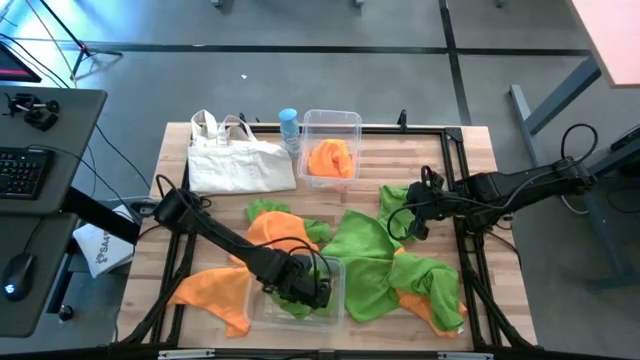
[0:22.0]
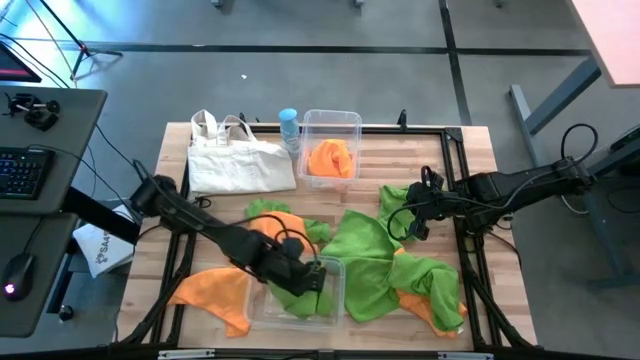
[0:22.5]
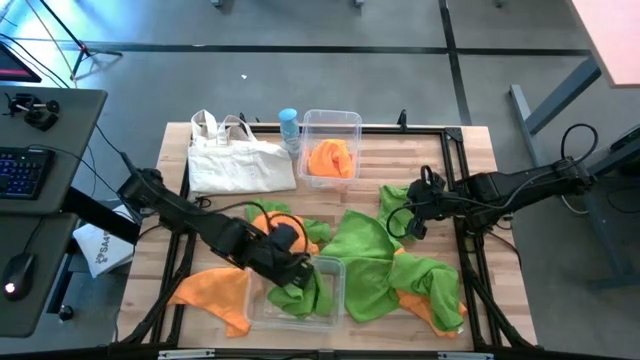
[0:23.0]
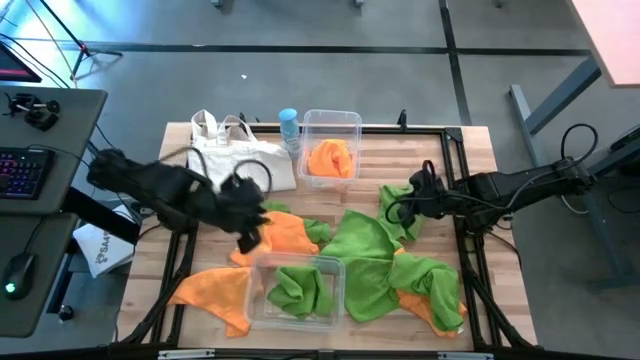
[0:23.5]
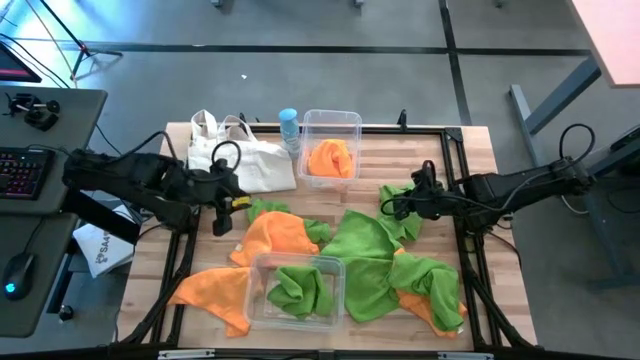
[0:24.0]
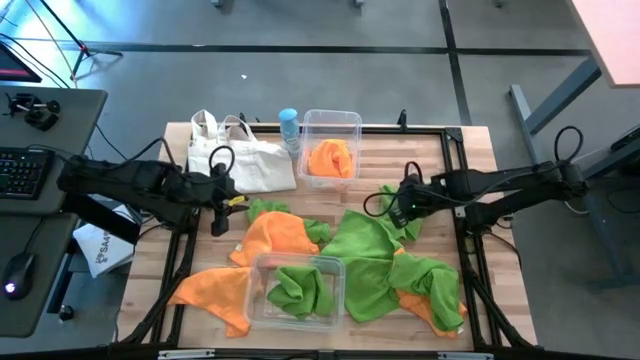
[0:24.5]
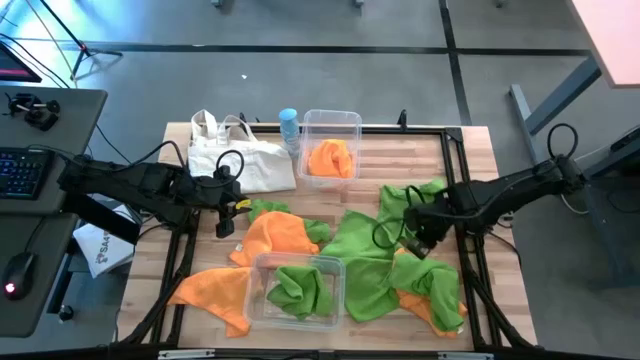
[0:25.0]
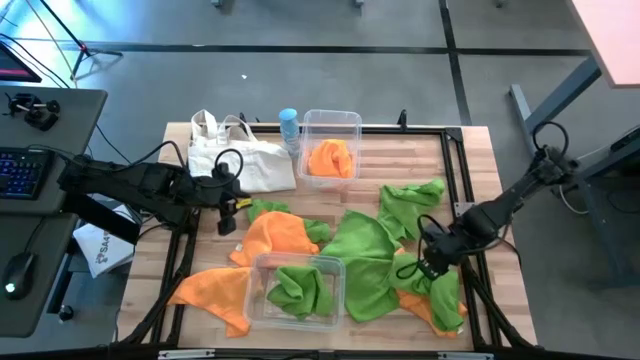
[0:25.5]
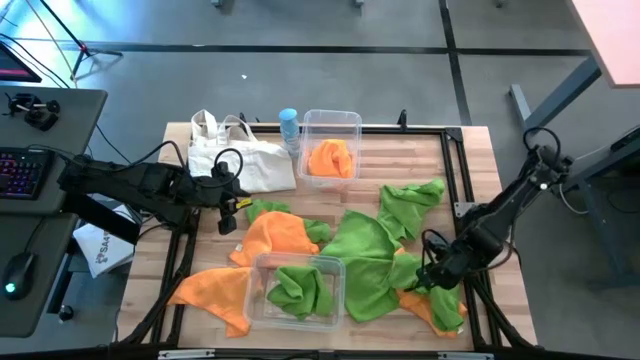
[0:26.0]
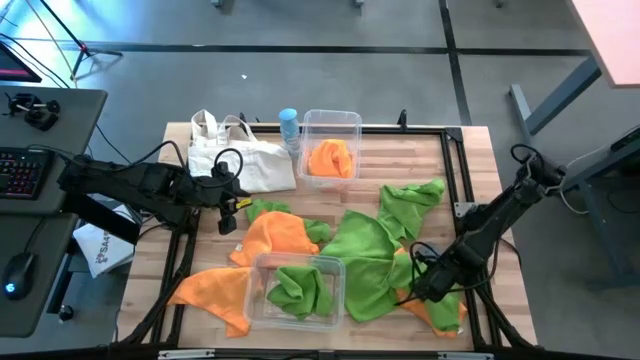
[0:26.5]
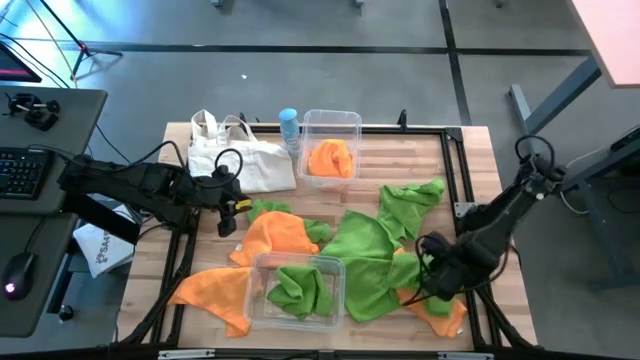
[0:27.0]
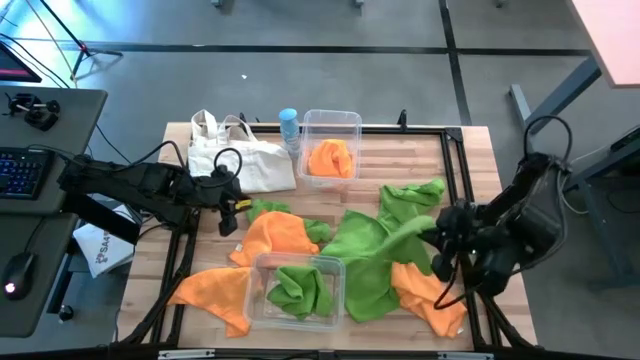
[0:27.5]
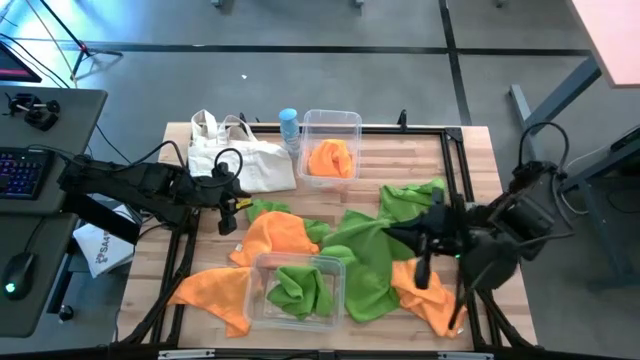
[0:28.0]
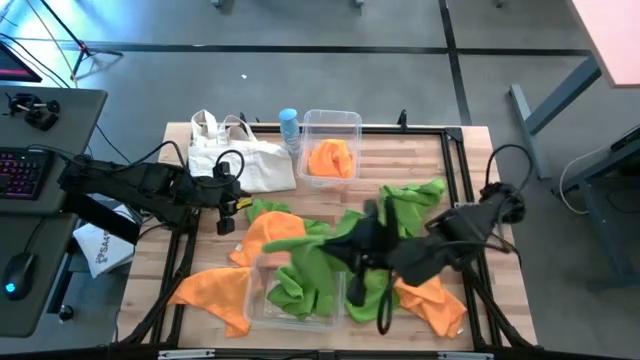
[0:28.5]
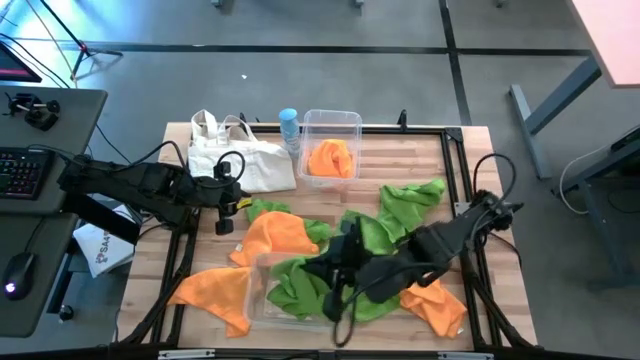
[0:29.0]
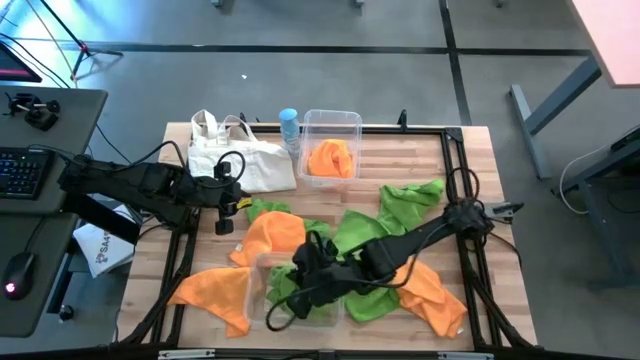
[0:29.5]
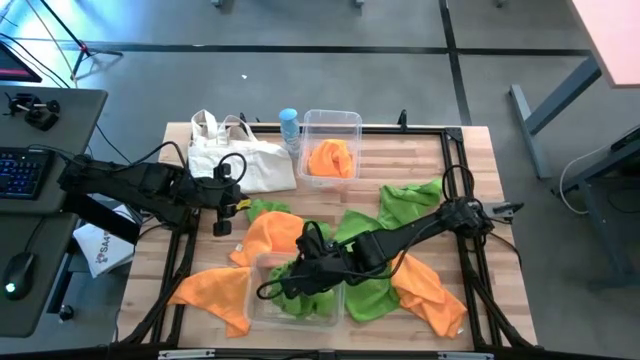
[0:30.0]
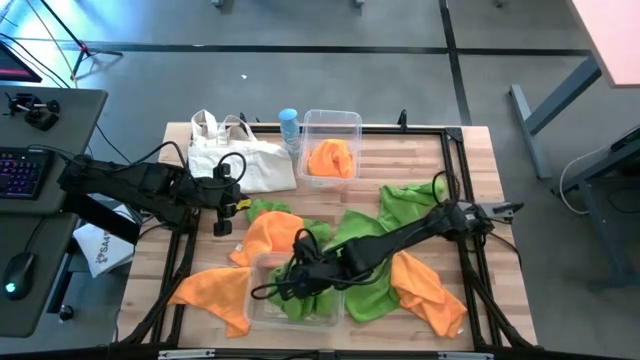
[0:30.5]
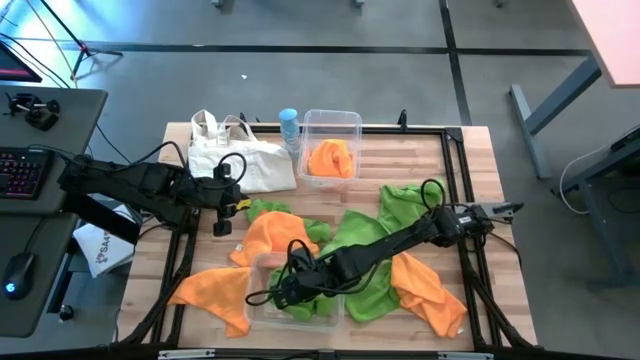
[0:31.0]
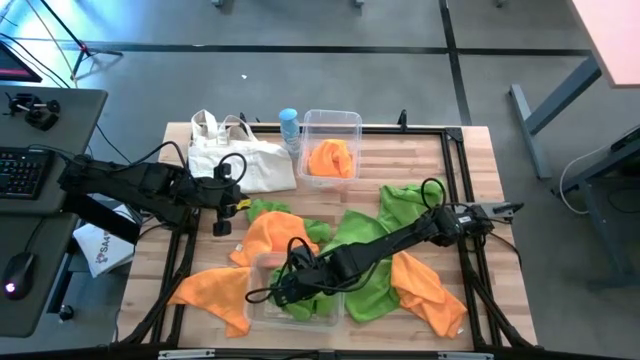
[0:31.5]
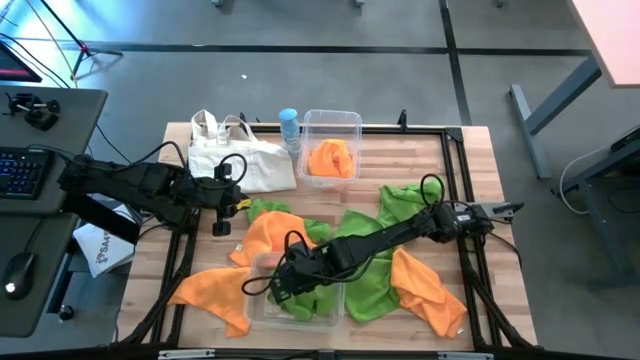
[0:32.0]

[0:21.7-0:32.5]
Task: Sort microfiber towel by color & place in baskets
Put the green microfiber cloth into the bottom transparent bin

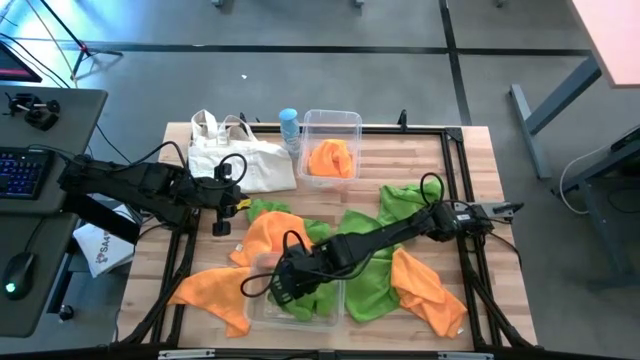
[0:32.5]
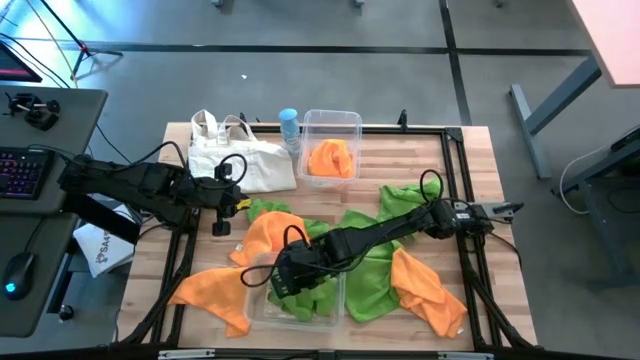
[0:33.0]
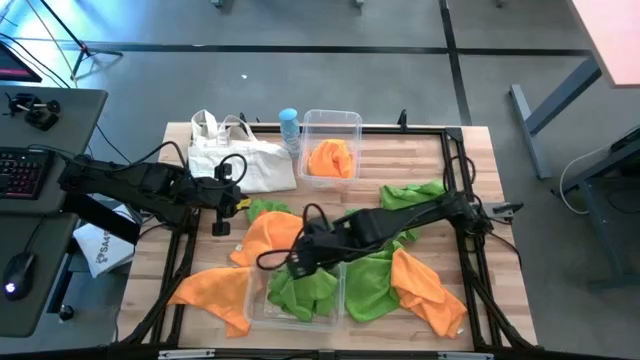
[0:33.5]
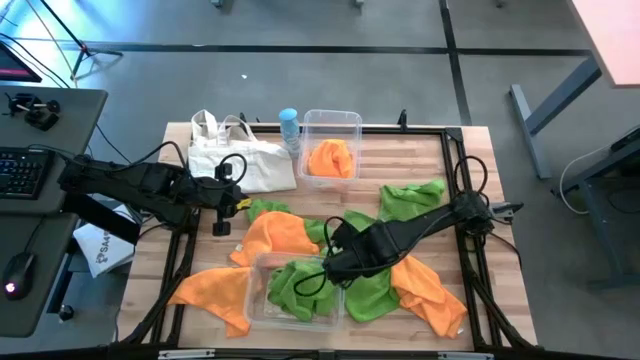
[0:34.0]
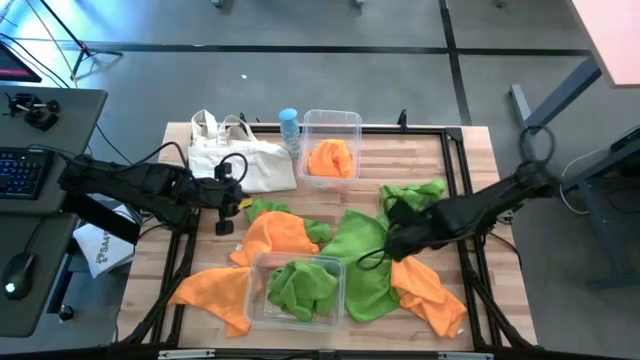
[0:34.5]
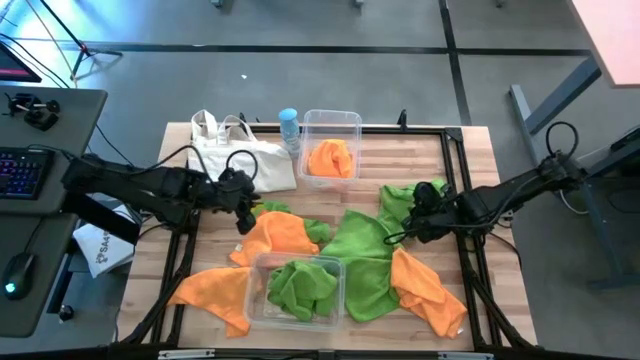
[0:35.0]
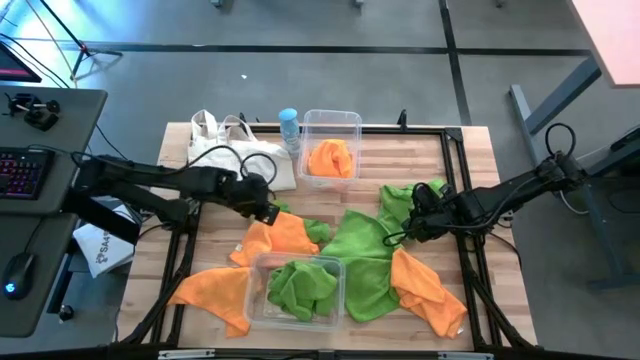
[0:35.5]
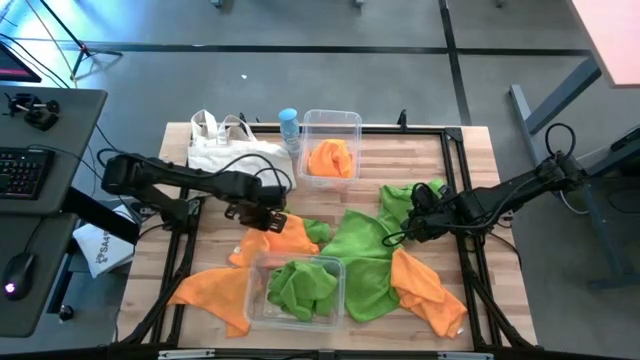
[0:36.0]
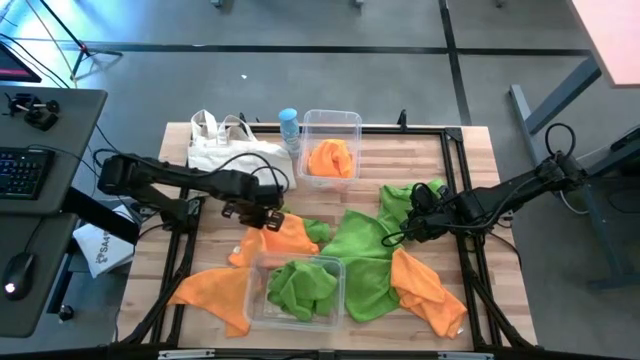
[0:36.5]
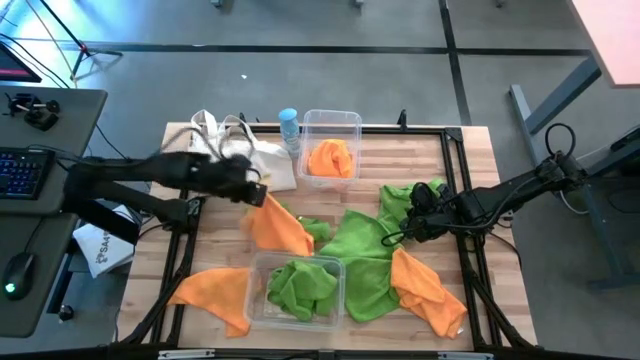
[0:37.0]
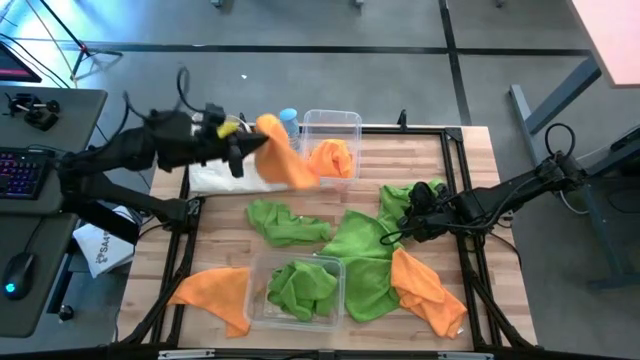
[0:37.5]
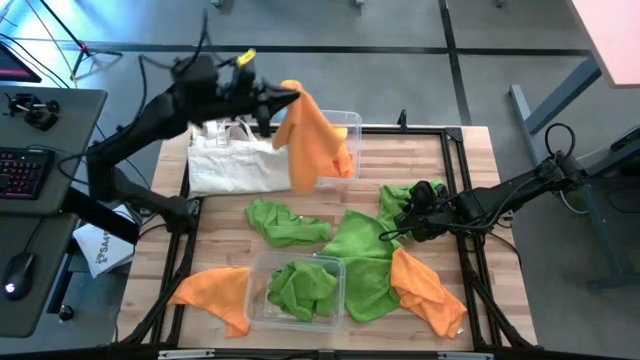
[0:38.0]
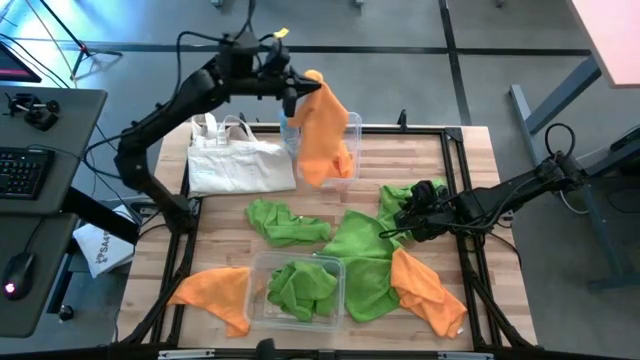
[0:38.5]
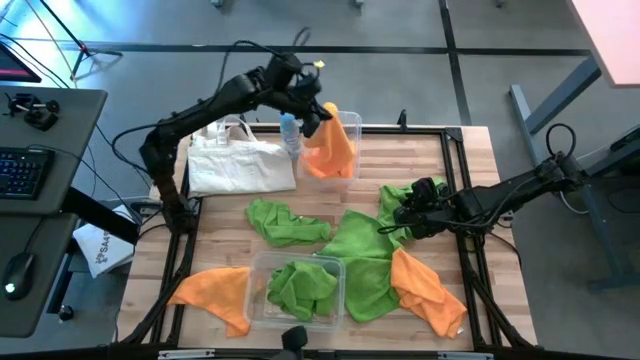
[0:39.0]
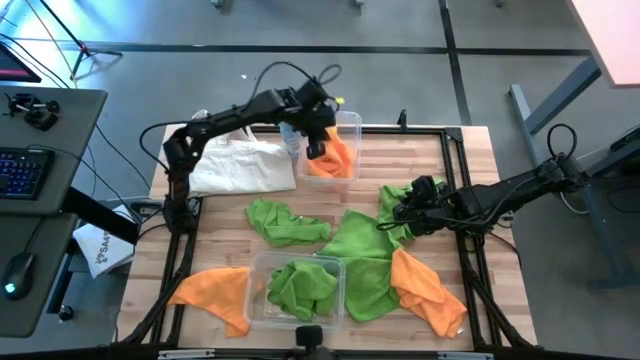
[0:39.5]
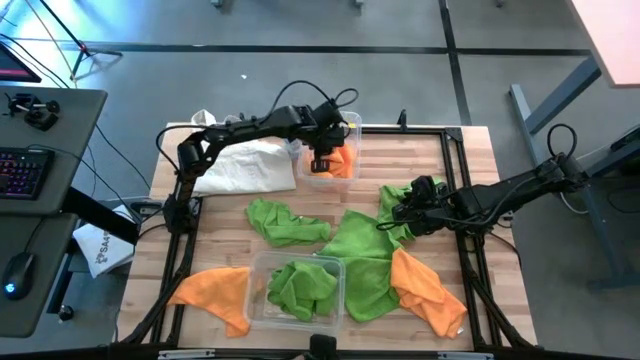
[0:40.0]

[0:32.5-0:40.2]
Put the orange microfiber cloth into the top transparent bin

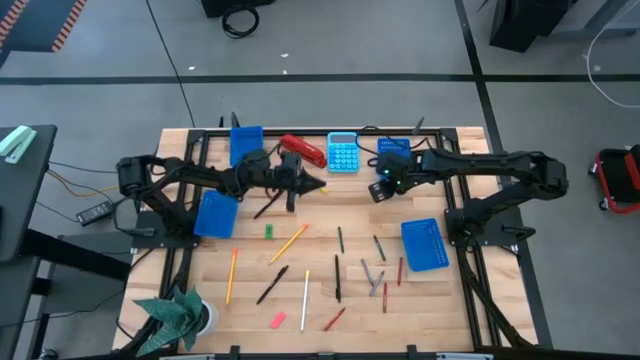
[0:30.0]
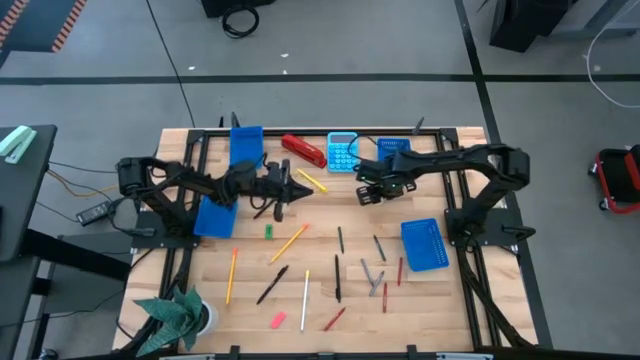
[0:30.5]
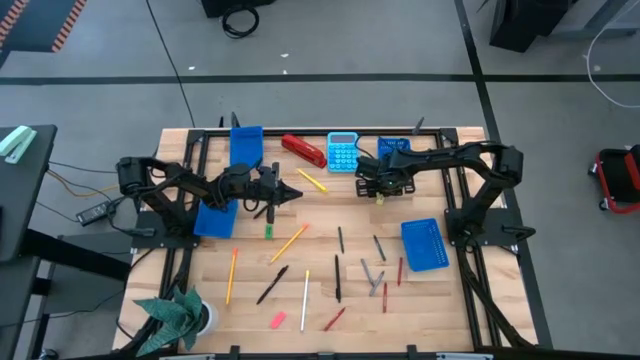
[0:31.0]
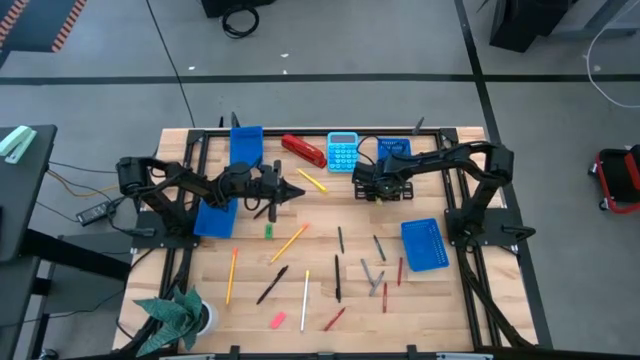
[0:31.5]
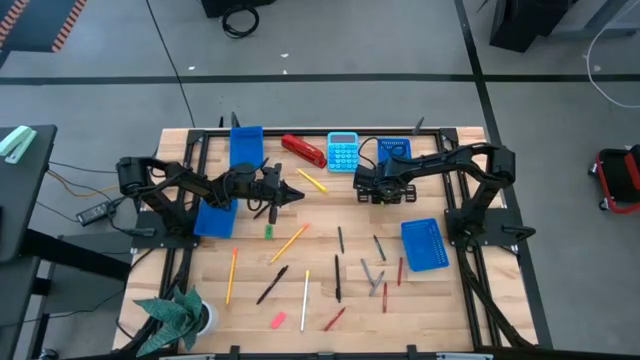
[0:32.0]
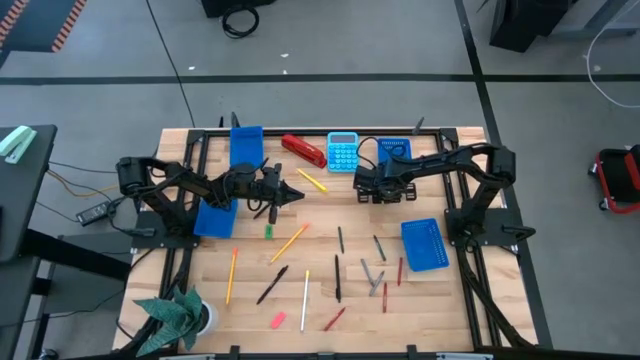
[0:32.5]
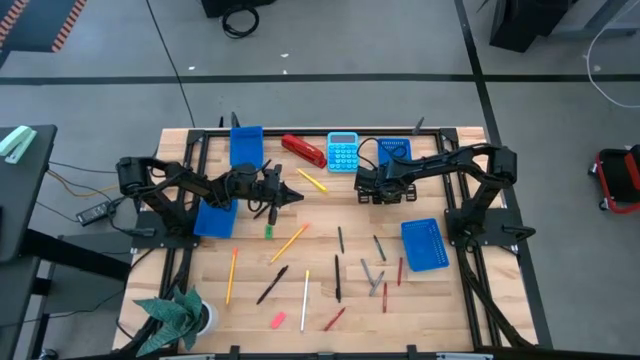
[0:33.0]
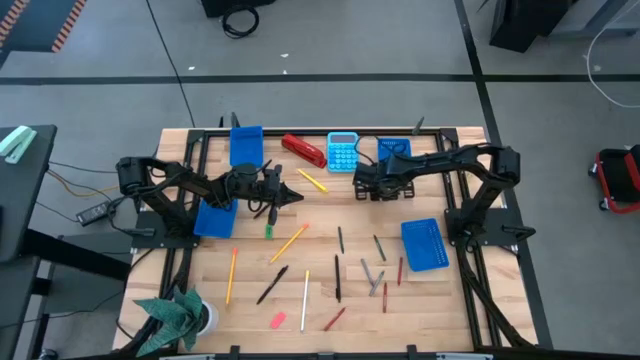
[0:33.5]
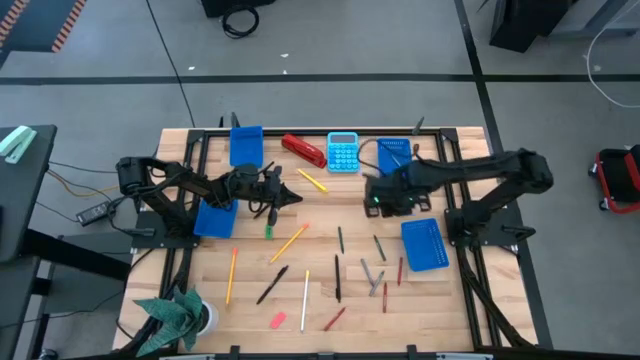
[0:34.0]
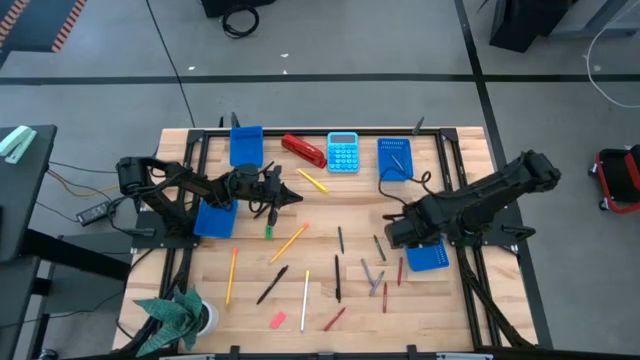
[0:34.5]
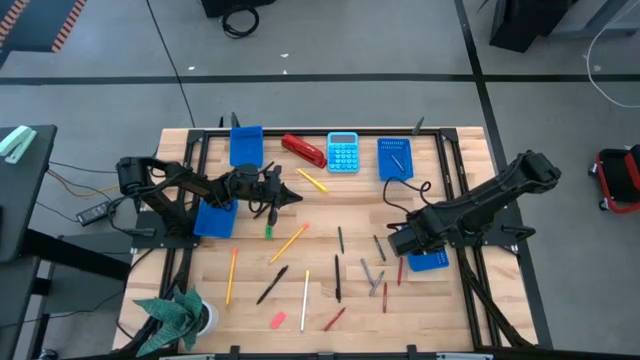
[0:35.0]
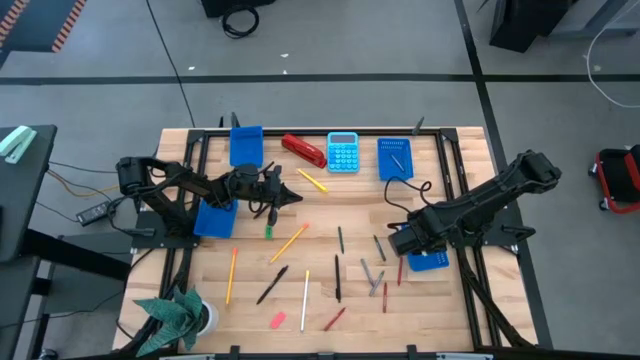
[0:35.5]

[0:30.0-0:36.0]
Task: Sort crayons/erasers/pens/pencils in bins
Put the yellow eraser into the bottom right bin
